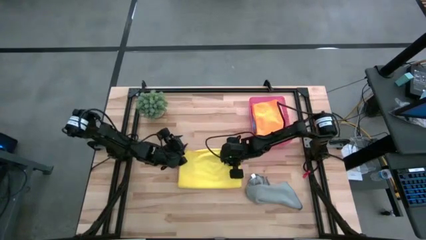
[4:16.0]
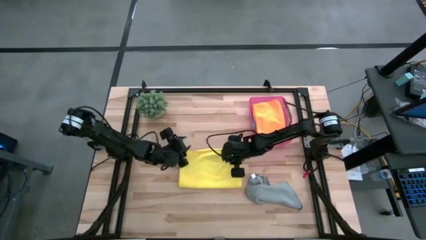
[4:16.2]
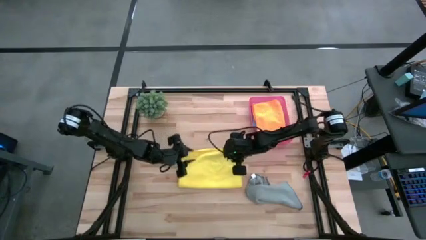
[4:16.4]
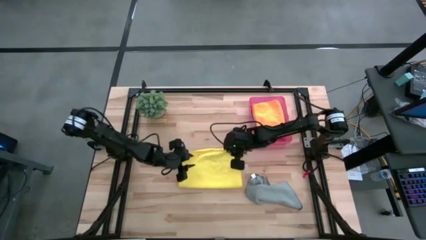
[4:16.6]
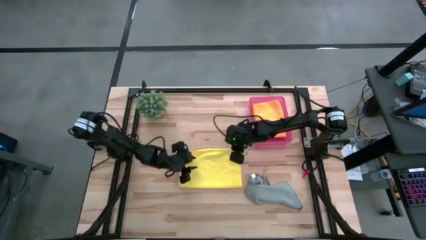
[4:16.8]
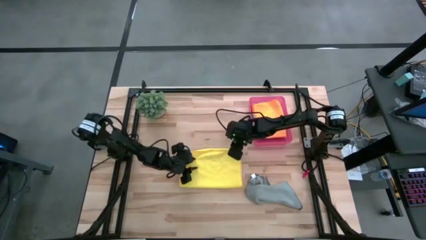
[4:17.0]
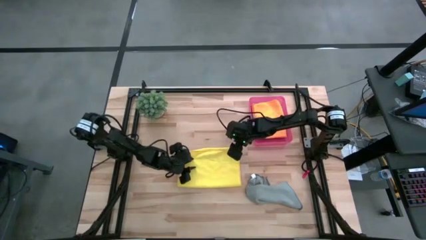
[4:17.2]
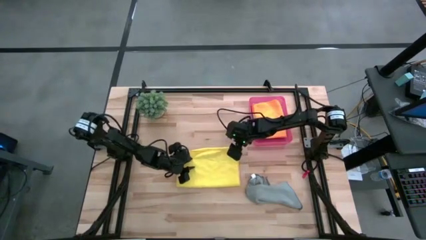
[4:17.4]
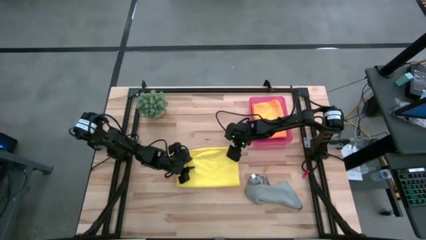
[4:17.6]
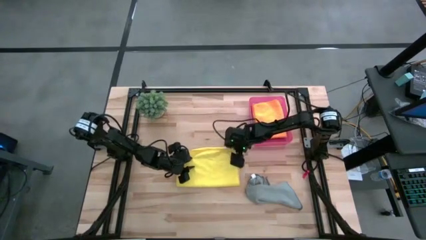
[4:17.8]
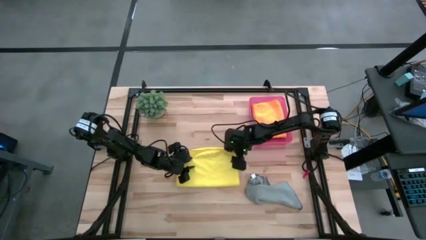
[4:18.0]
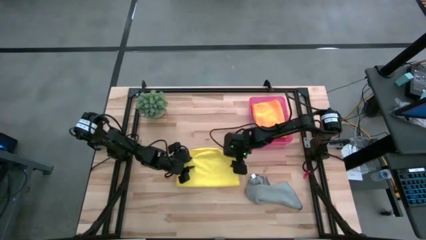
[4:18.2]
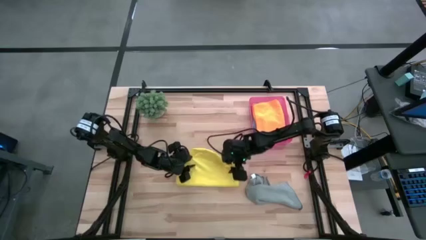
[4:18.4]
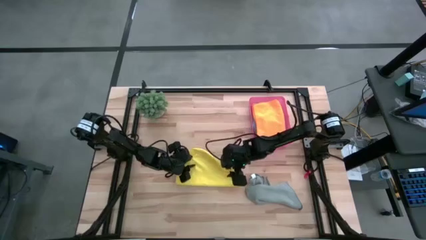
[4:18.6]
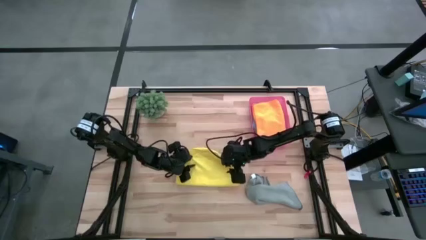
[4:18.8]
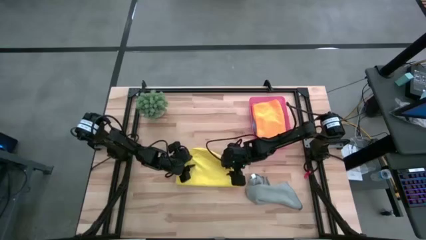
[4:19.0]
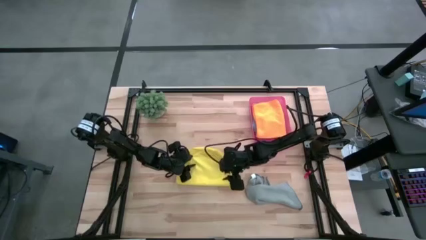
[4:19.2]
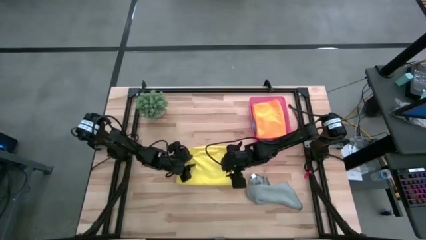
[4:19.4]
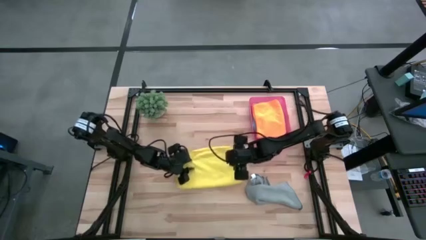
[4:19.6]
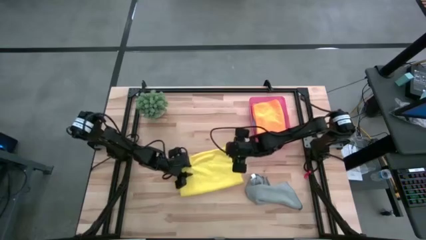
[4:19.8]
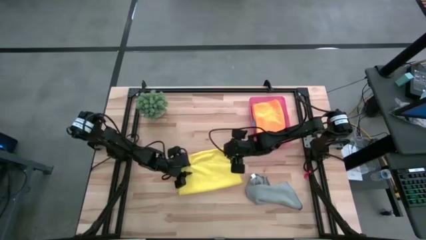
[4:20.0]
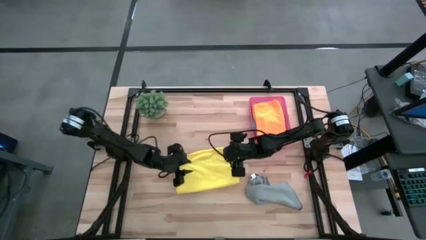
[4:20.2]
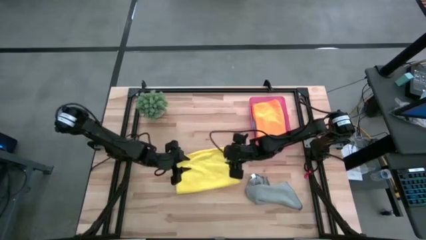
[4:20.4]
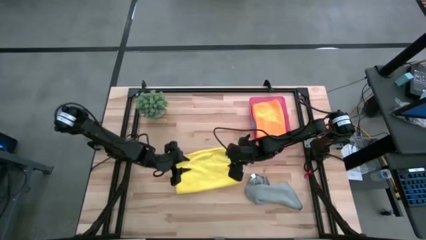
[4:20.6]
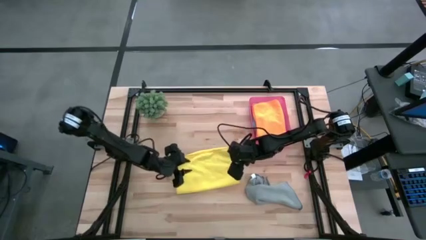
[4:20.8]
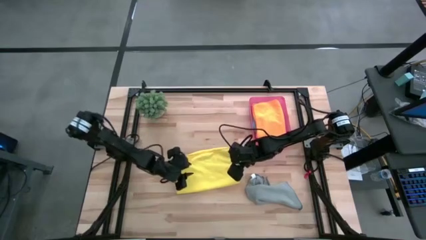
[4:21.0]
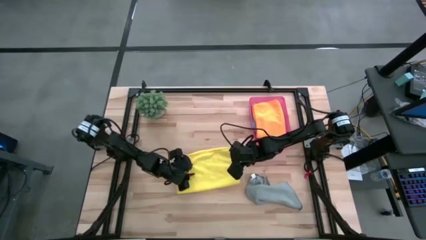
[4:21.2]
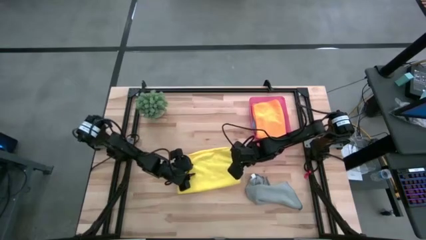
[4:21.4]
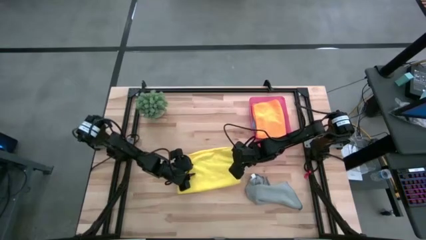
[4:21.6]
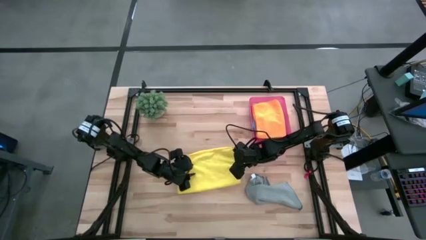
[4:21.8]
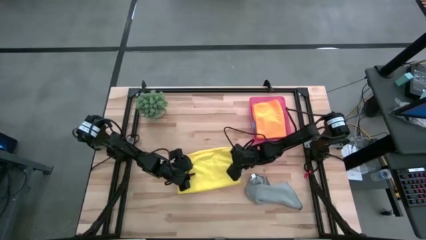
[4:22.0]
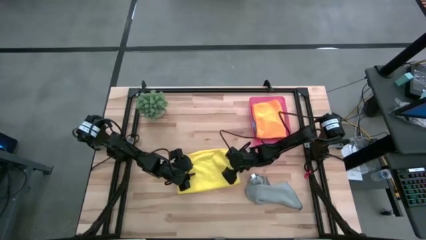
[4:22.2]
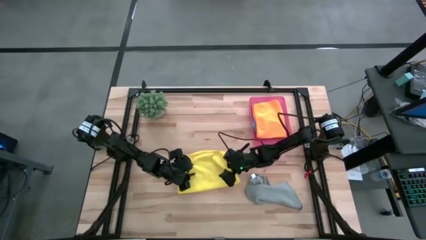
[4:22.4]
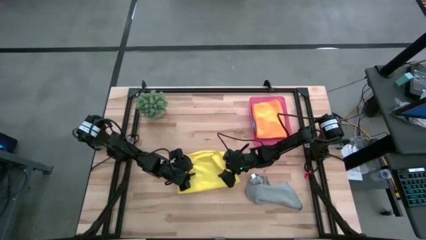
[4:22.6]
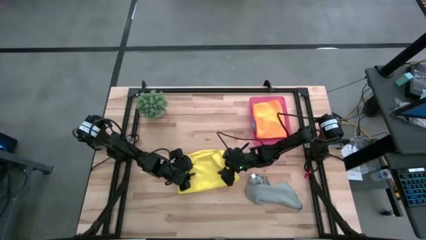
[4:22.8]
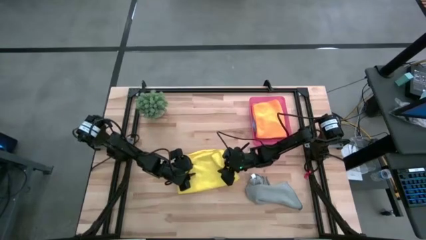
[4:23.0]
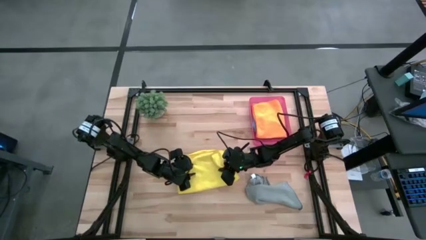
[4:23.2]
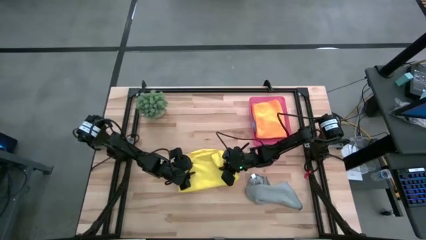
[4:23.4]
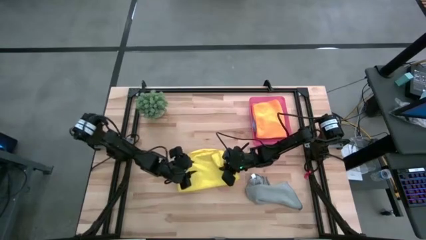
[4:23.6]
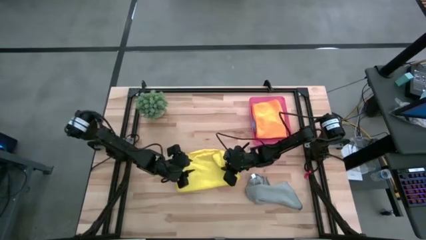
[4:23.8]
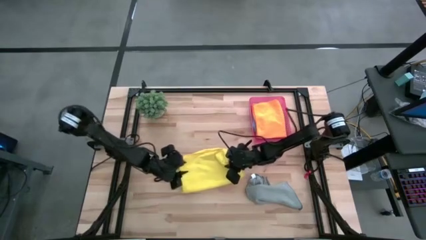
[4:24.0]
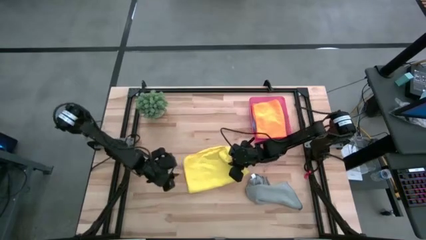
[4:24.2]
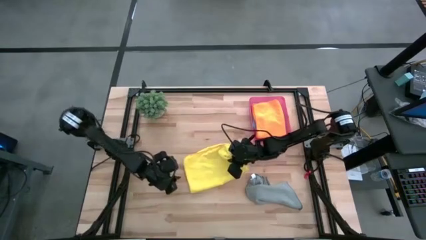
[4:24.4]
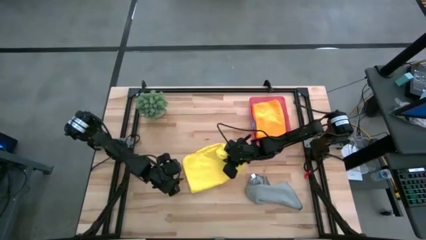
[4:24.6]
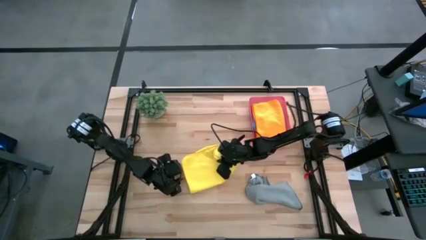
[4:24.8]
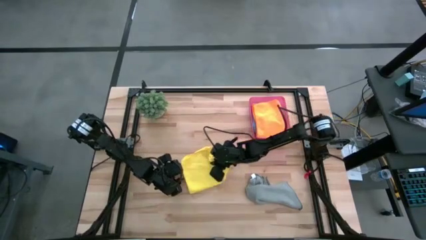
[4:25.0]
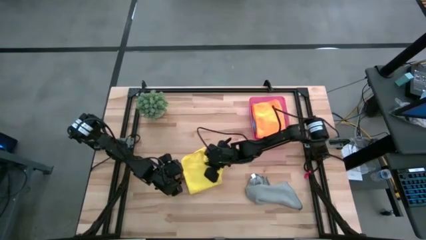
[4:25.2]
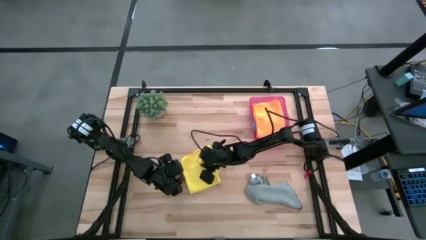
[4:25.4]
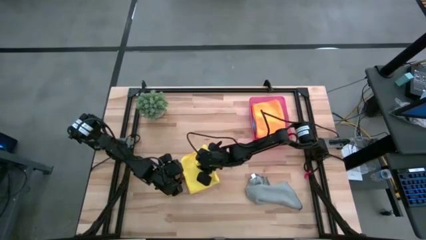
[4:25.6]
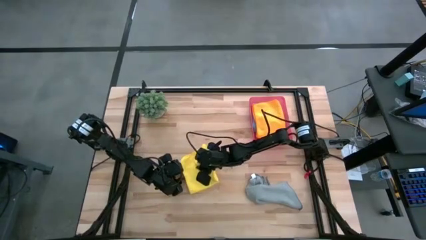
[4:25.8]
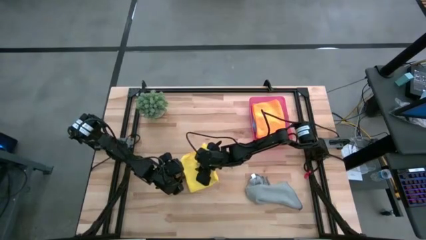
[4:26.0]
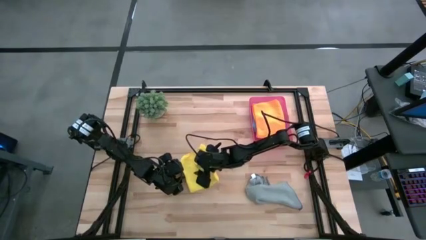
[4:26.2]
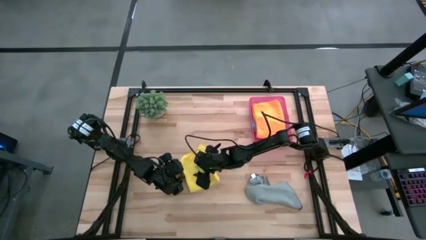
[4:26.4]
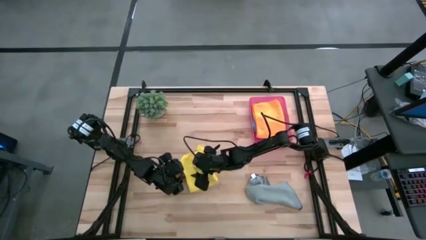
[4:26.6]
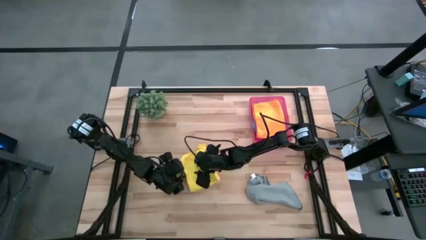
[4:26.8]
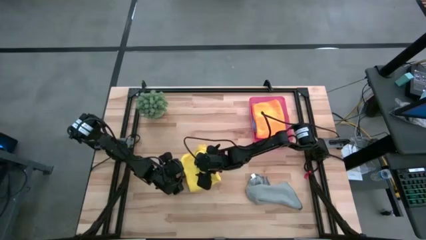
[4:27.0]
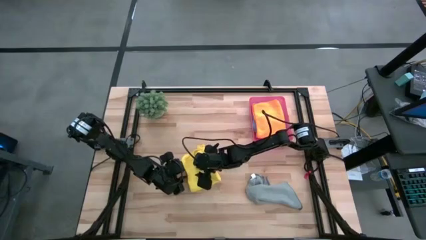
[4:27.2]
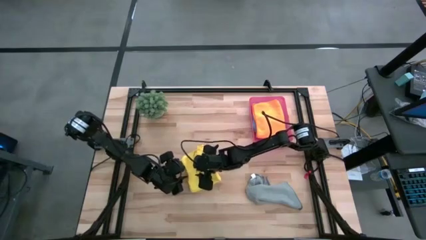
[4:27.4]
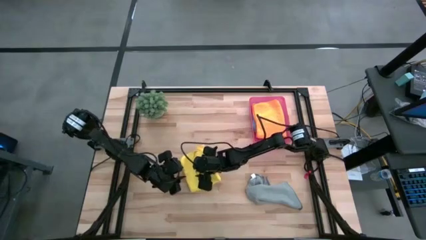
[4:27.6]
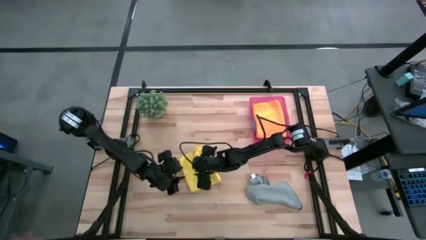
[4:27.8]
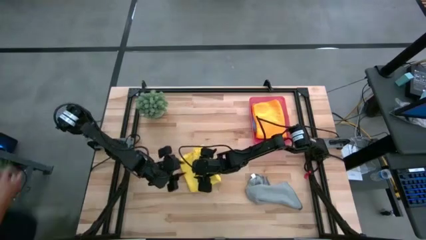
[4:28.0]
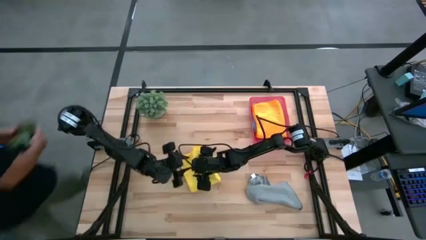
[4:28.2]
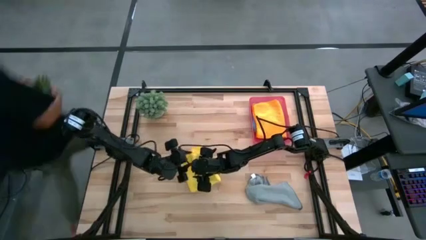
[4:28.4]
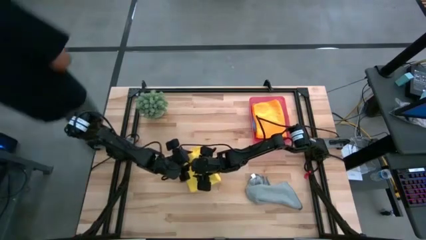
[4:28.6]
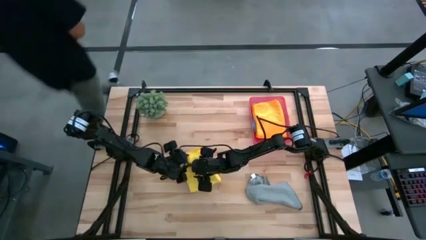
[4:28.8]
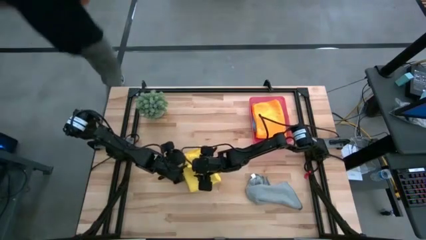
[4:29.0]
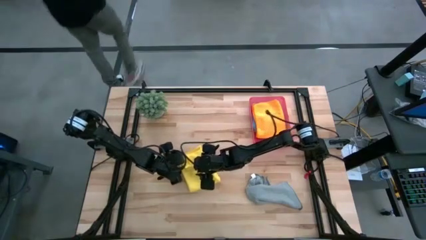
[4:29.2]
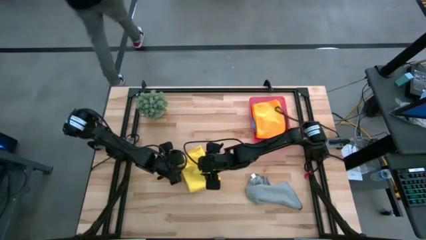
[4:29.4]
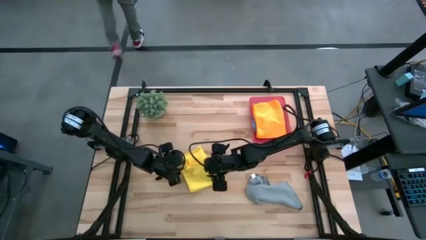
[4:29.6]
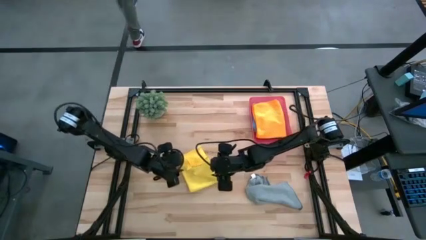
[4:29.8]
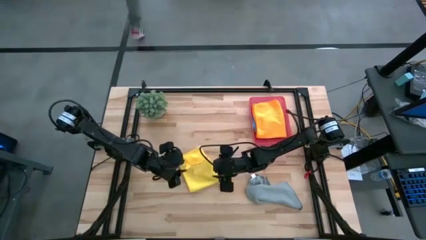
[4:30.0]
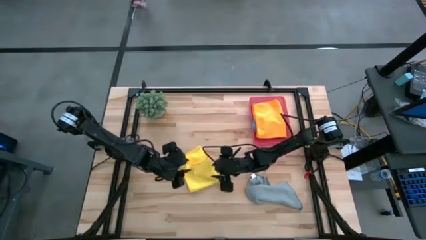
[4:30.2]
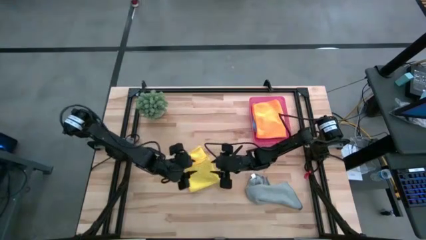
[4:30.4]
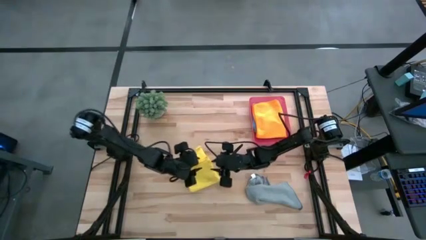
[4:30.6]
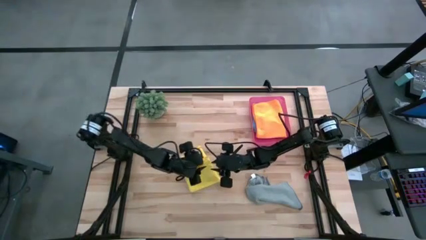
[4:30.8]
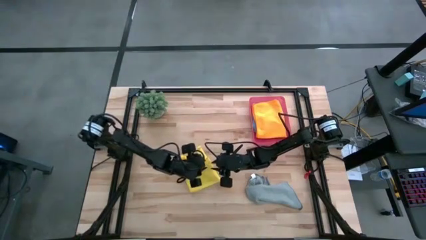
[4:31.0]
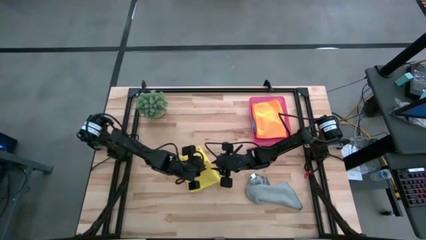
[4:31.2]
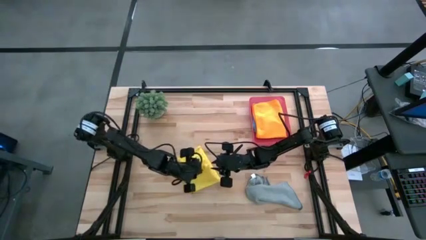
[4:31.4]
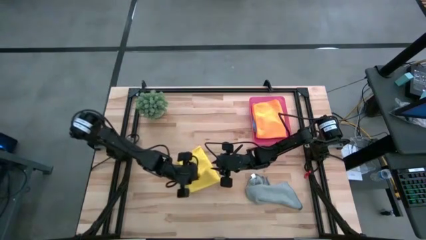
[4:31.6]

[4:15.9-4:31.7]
Task: Fold microfiber towels
Fold the yellow microfiber cloth
